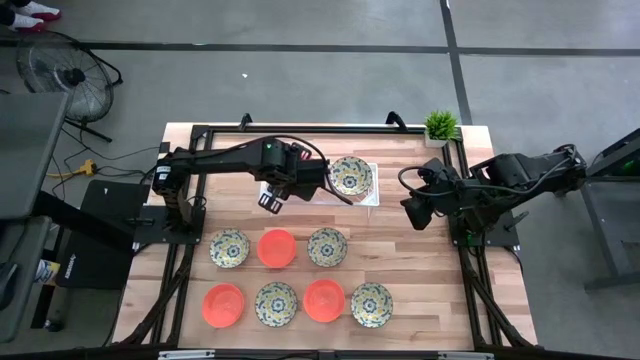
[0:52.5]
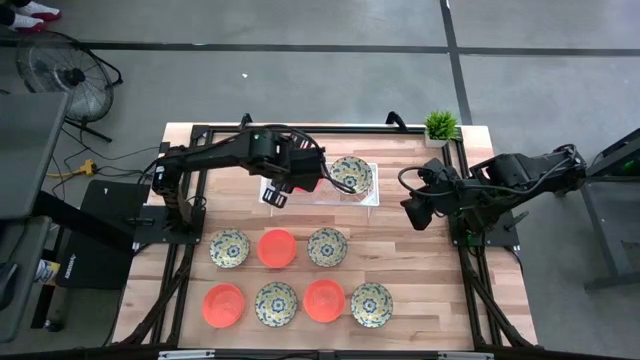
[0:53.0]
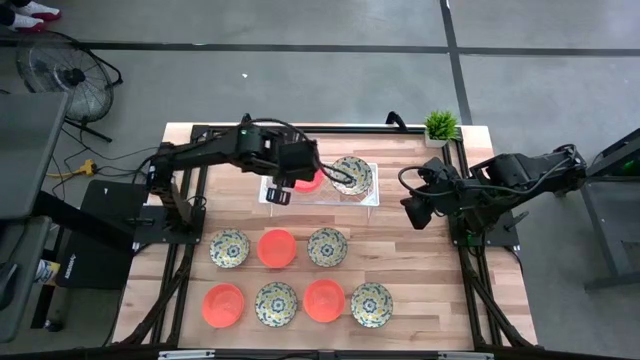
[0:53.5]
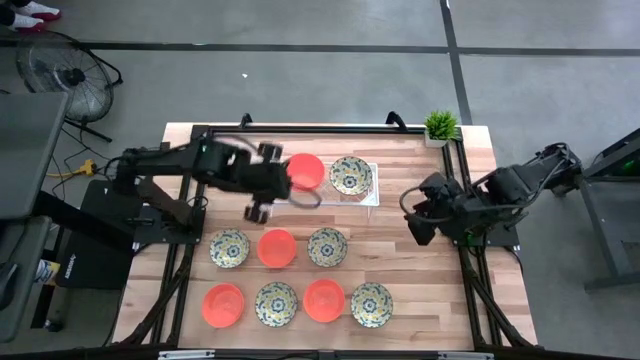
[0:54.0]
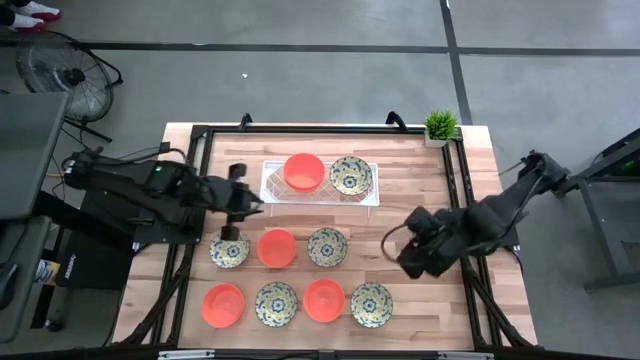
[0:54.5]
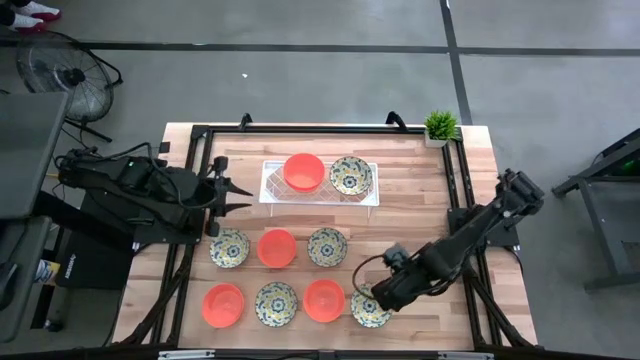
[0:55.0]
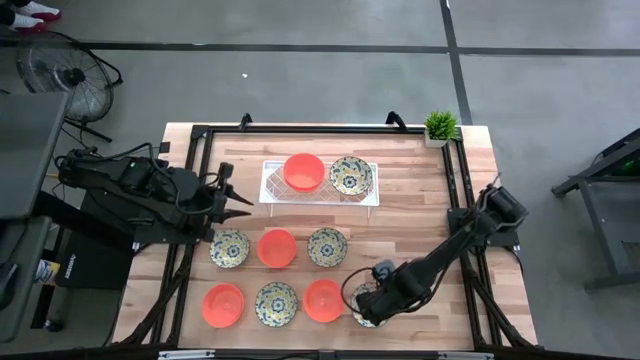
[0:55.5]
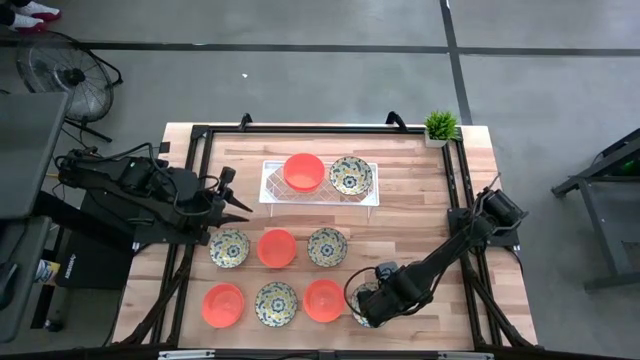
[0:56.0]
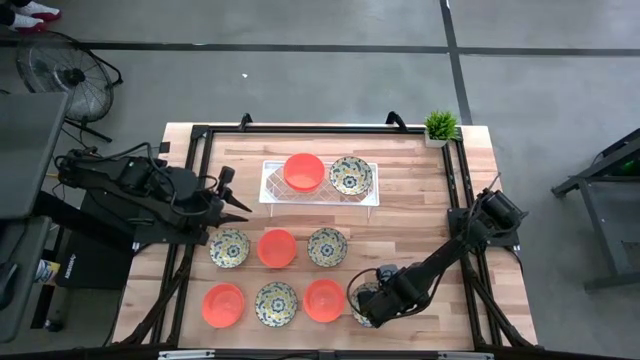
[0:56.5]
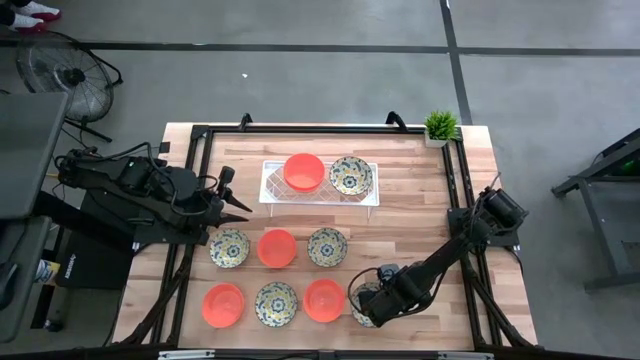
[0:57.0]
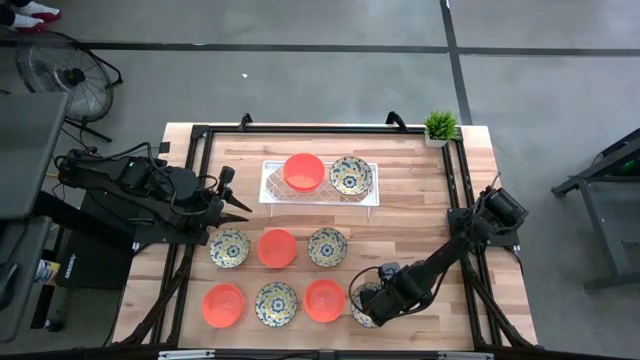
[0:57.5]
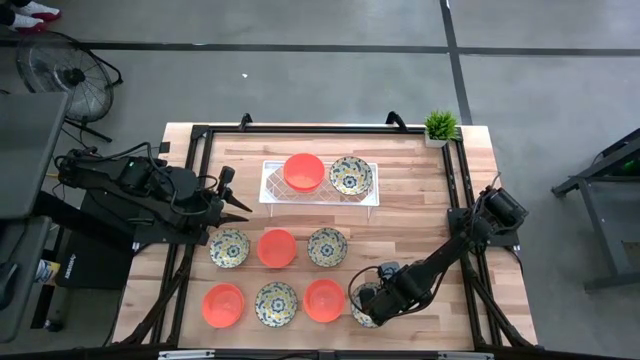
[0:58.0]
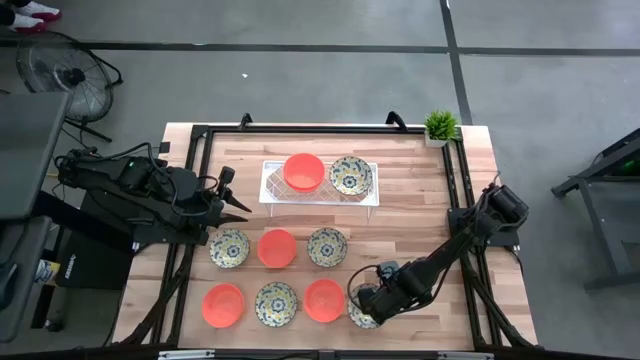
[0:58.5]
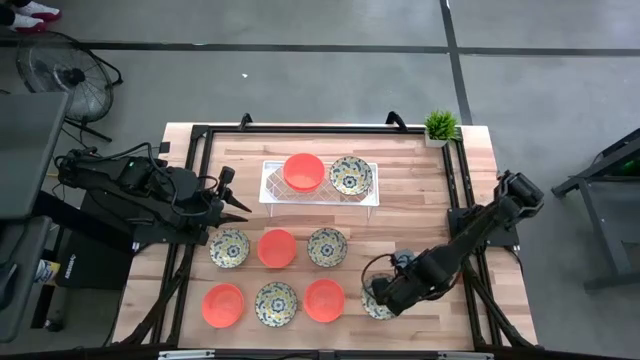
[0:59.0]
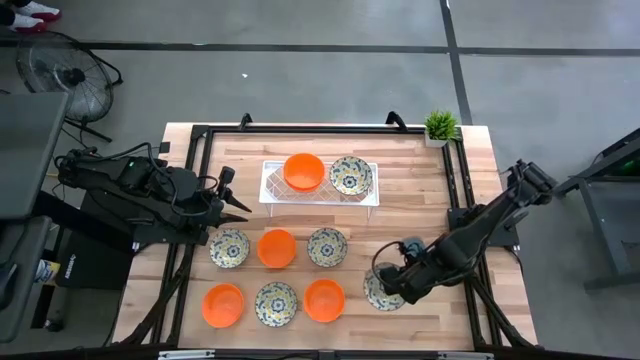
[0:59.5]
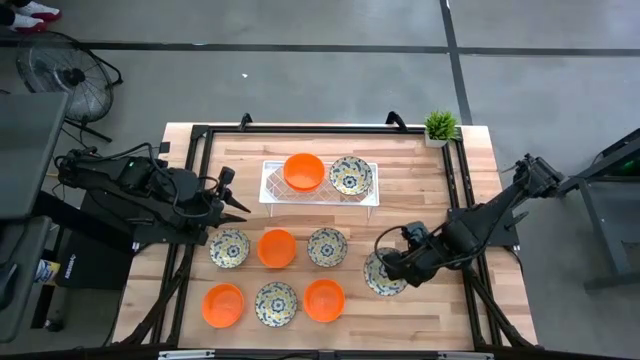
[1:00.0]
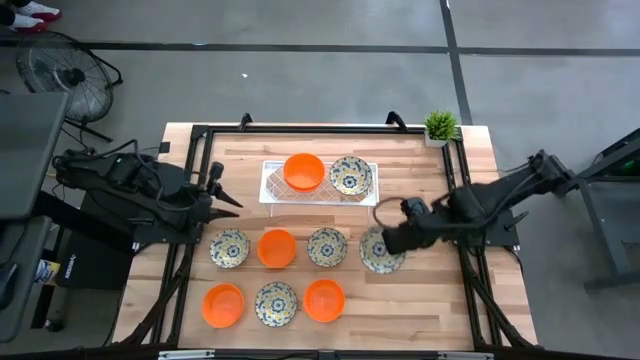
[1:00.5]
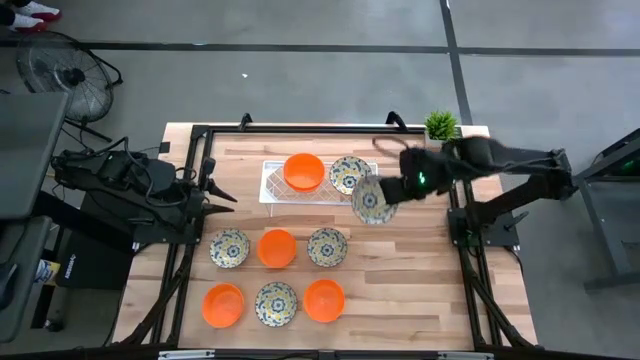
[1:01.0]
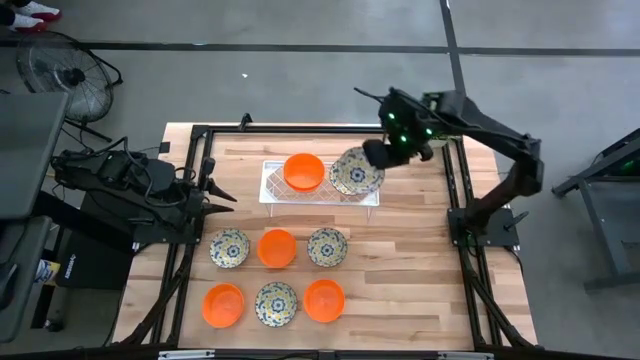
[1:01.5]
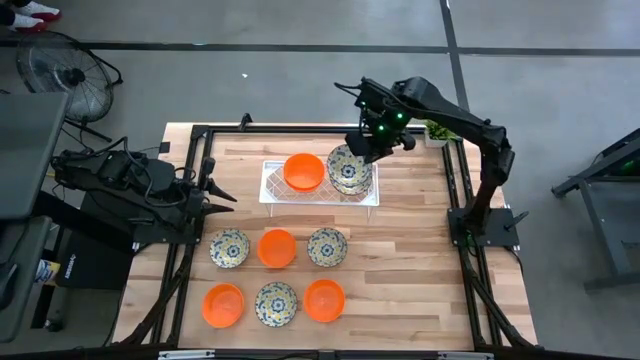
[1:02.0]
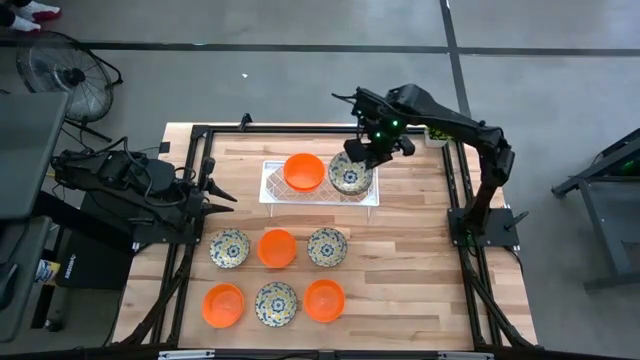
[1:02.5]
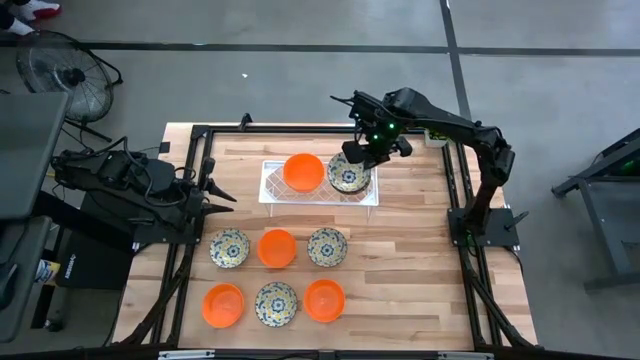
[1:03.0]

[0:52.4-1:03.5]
Task: Pick & Place Mini bowls
Stack the yellow patterned bowl on top of the other yellow patterned bowl on the shelf

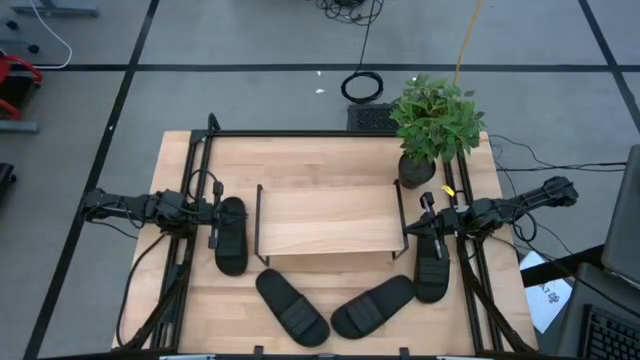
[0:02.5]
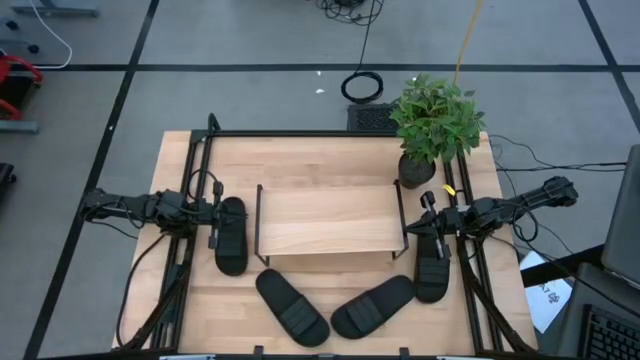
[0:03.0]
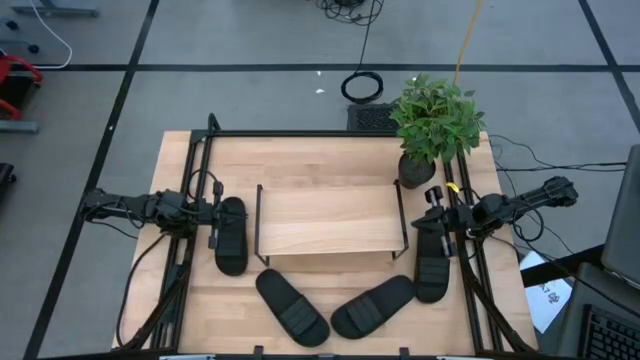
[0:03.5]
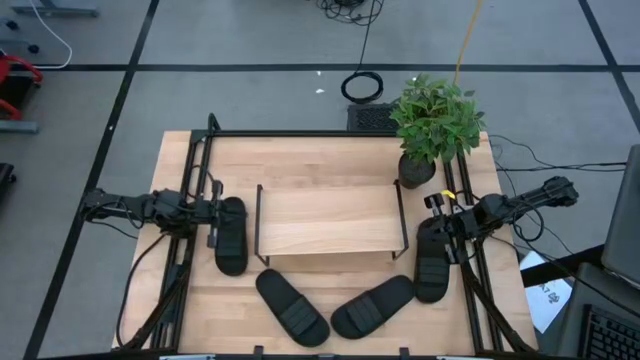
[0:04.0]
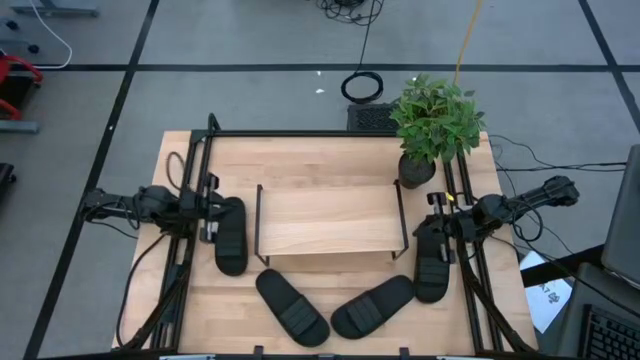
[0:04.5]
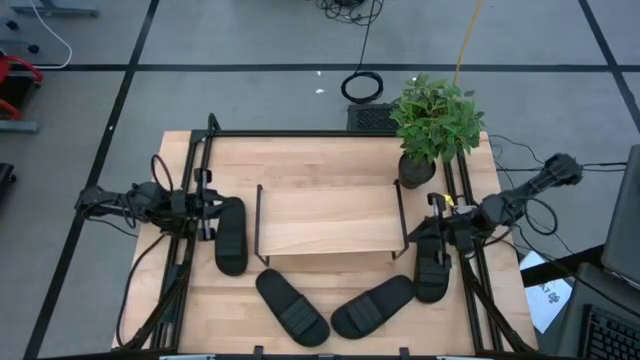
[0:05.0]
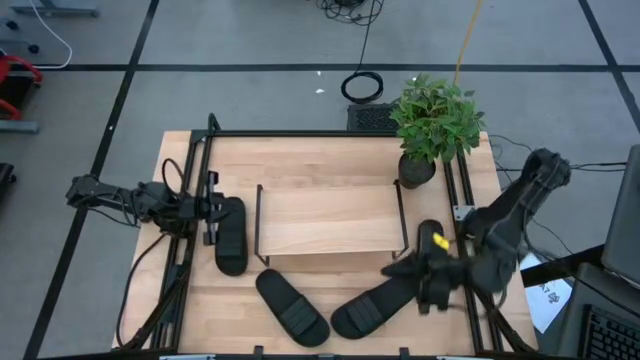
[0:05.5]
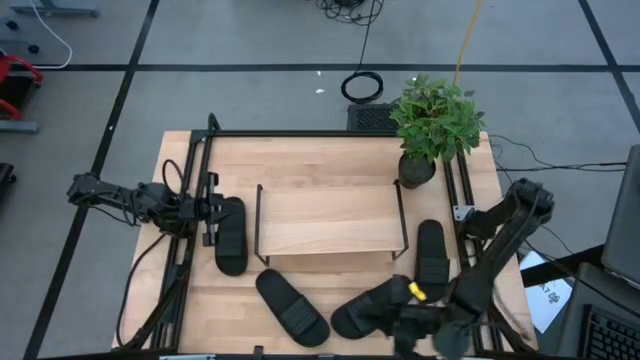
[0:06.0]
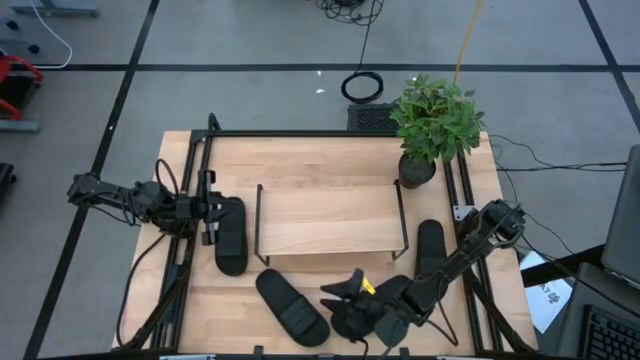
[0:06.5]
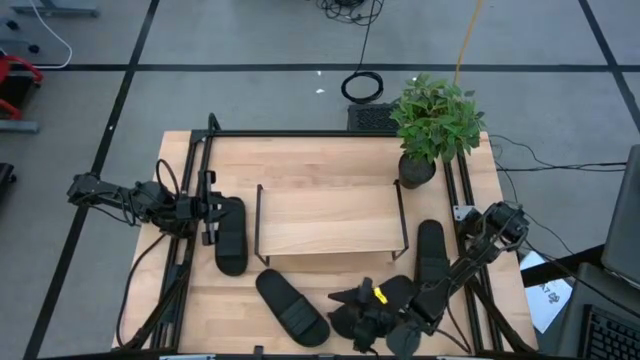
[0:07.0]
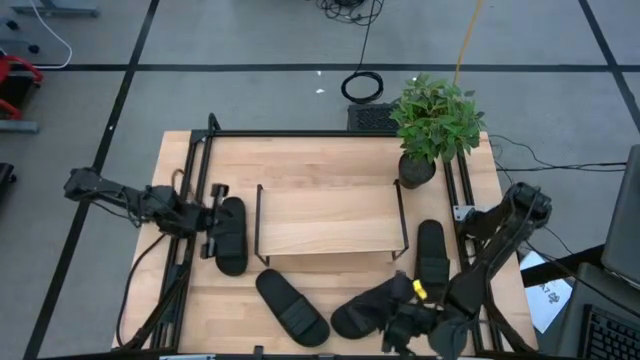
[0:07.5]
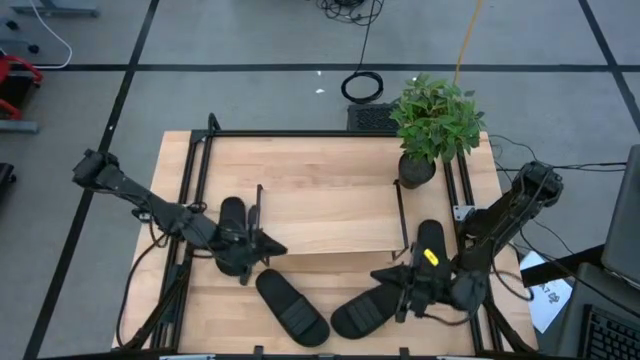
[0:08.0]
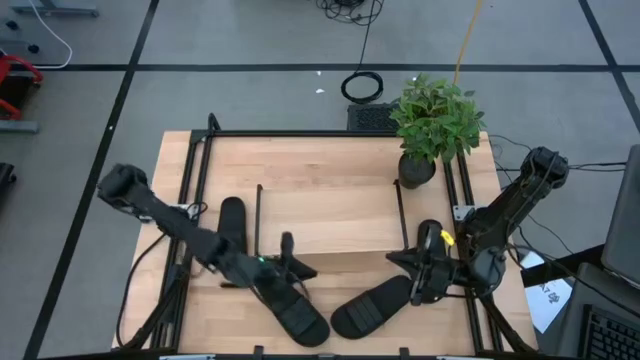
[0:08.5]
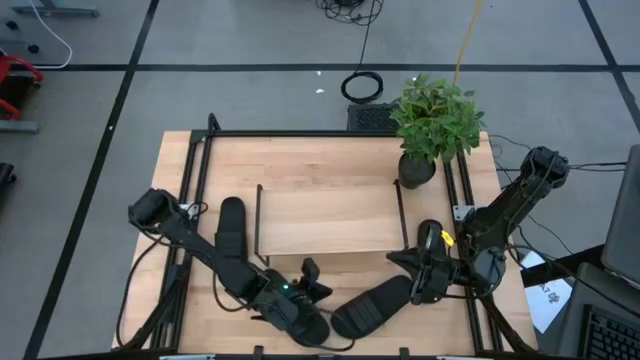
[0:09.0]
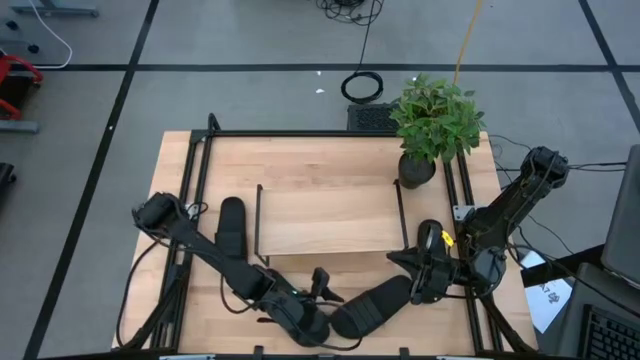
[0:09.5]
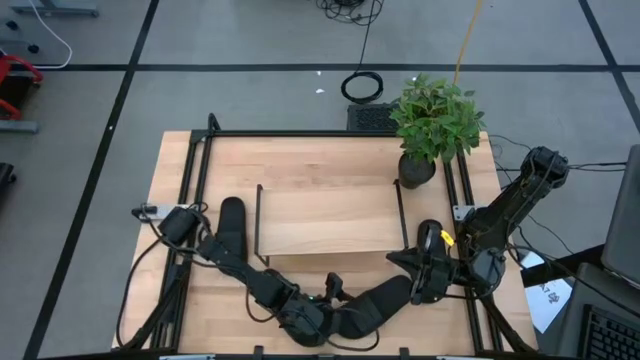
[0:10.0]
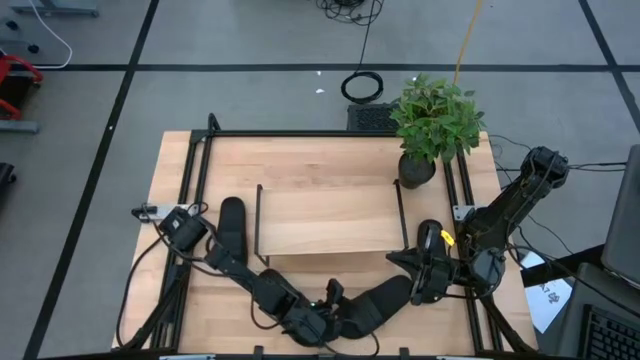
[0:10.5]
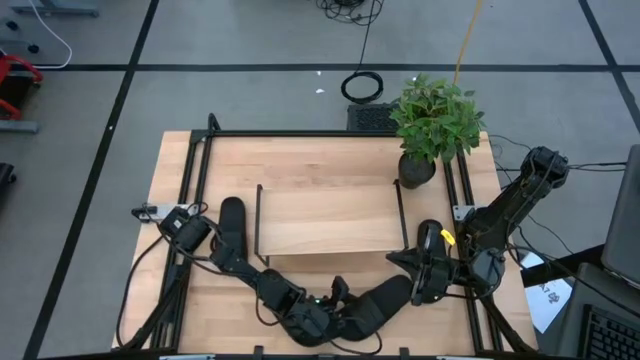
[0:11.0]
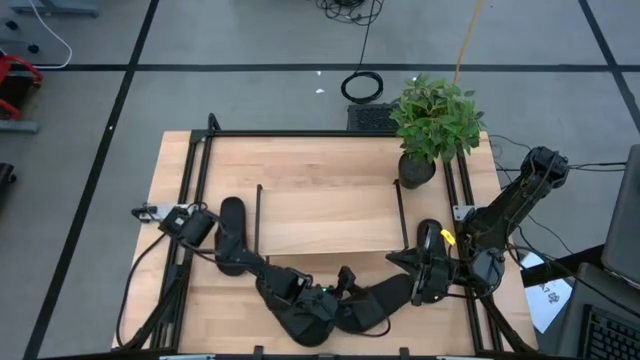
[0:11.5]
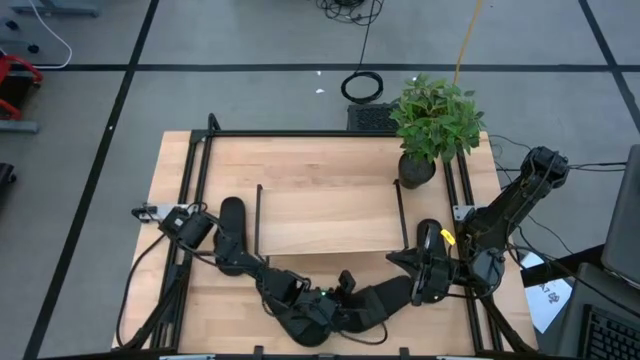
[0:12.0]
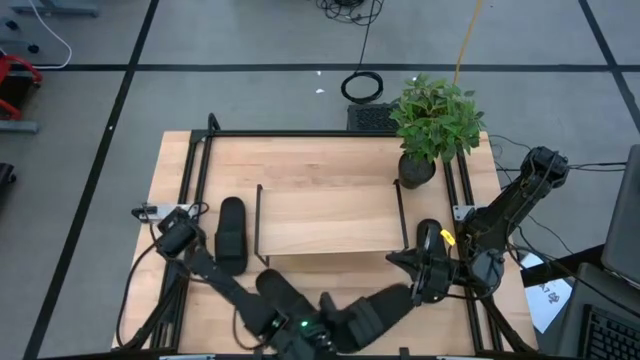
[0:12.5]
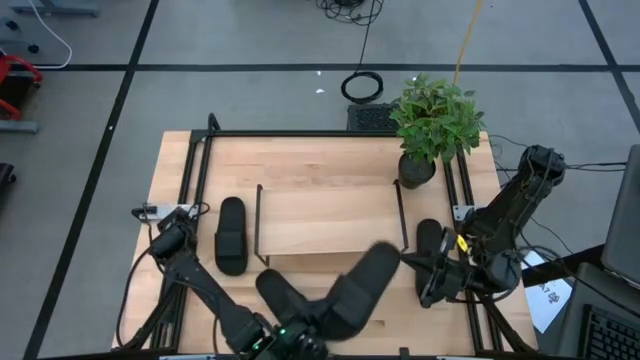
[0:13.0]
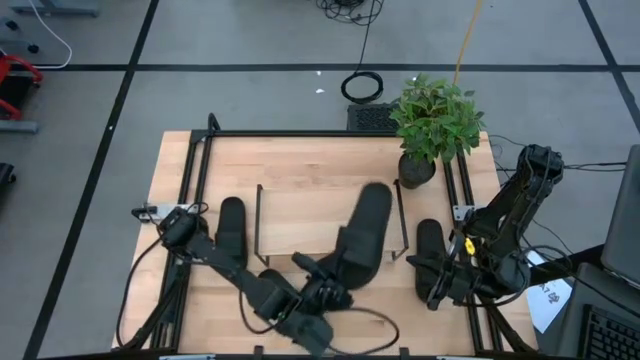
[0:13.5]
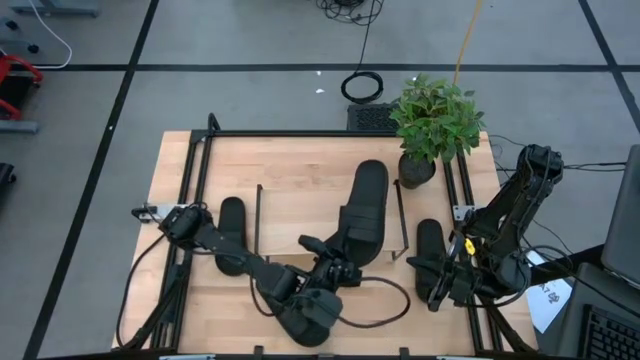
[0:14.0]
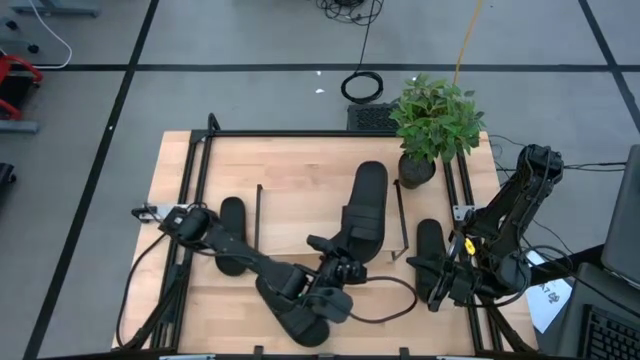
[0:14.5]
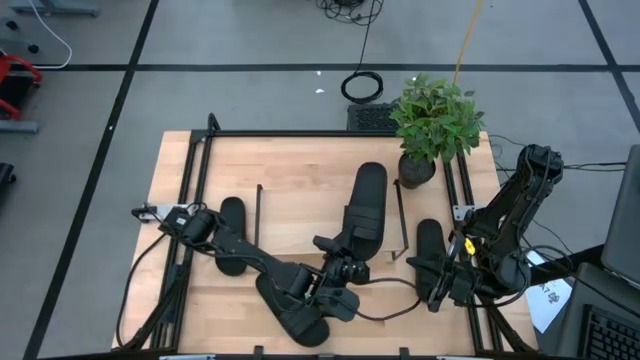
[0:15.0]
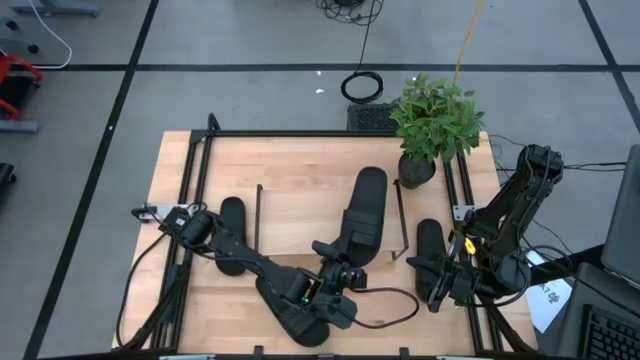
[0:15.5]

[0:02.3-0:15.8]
Task: Pick and place slides into the shelf
Put the bottom left black slide on the shelf
